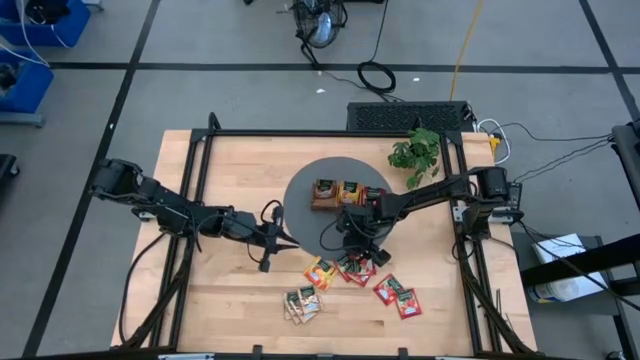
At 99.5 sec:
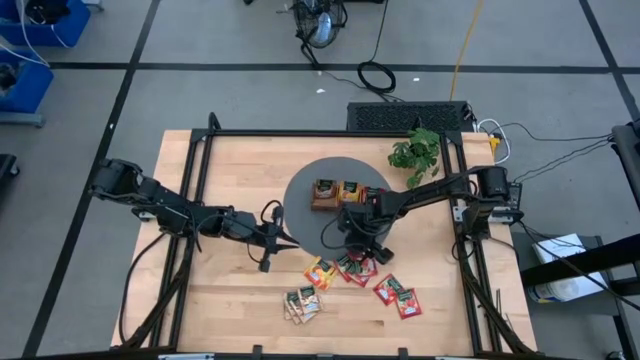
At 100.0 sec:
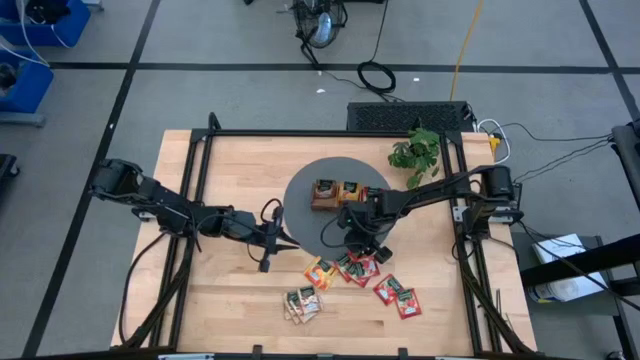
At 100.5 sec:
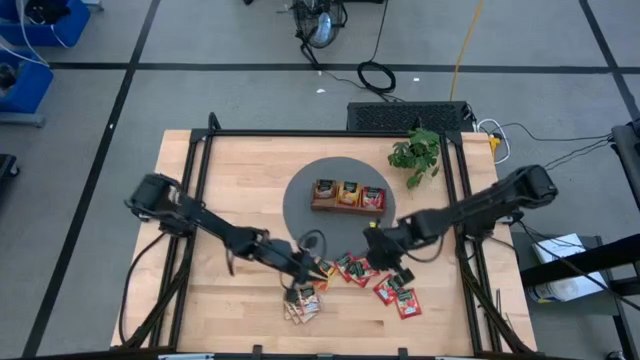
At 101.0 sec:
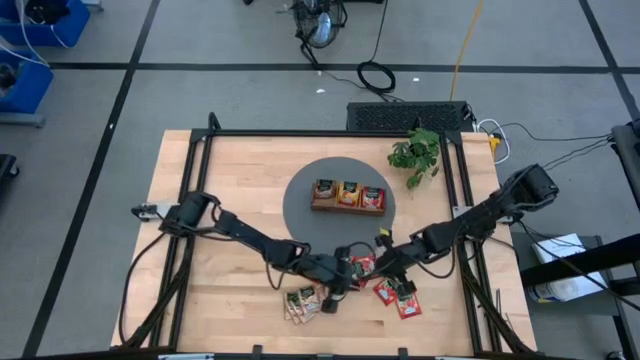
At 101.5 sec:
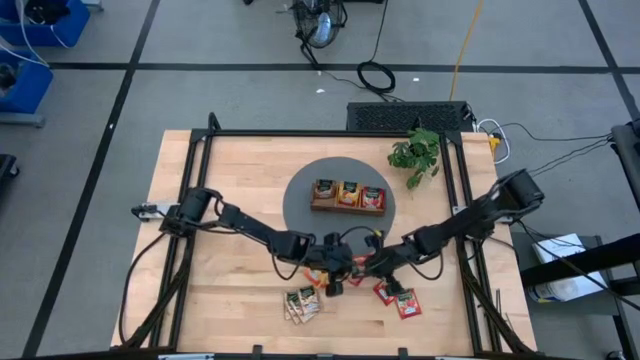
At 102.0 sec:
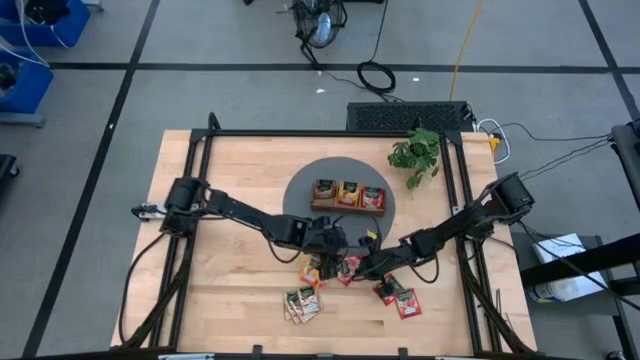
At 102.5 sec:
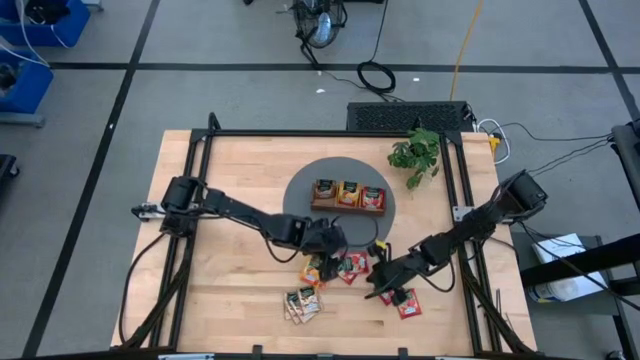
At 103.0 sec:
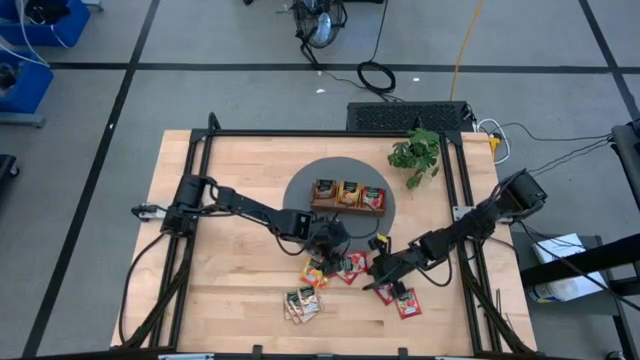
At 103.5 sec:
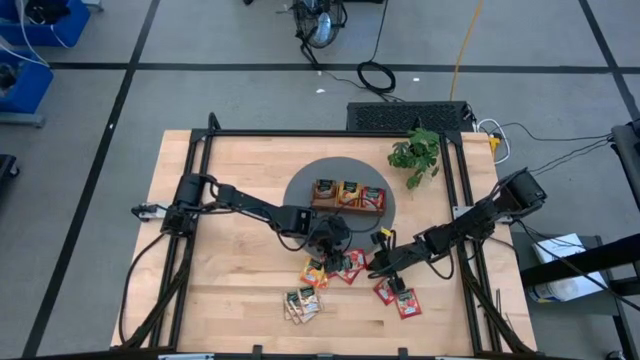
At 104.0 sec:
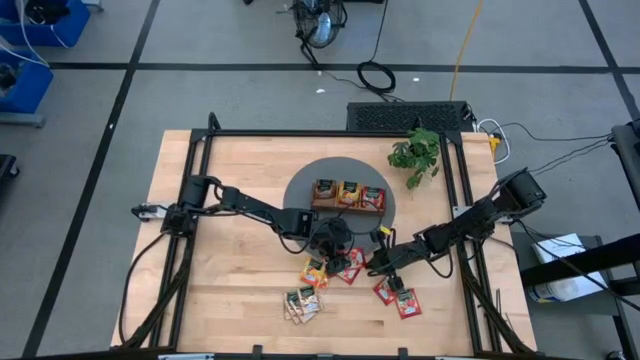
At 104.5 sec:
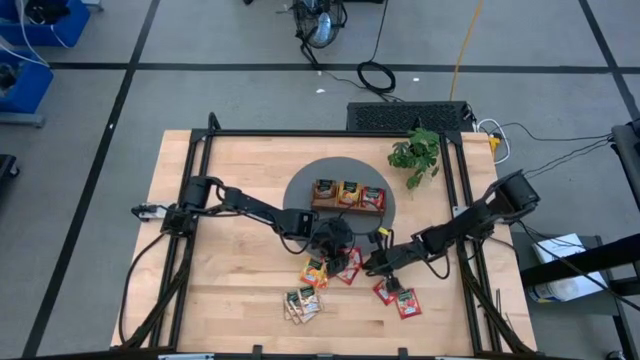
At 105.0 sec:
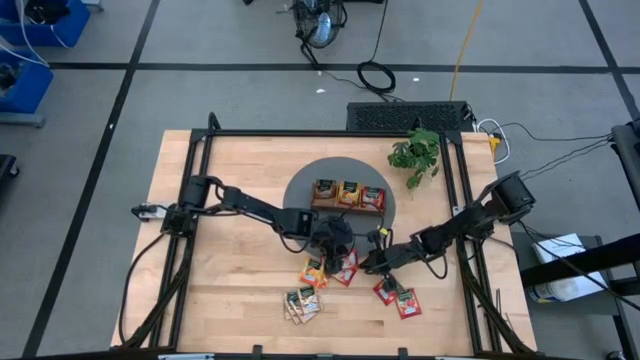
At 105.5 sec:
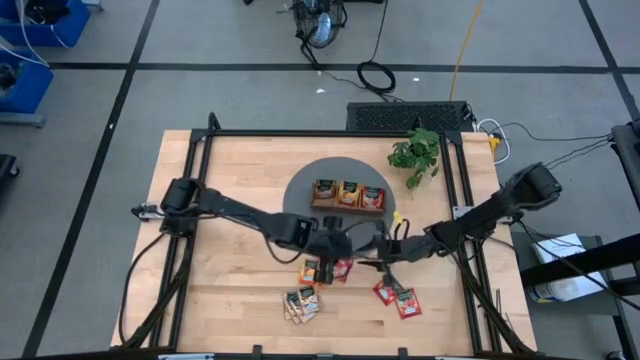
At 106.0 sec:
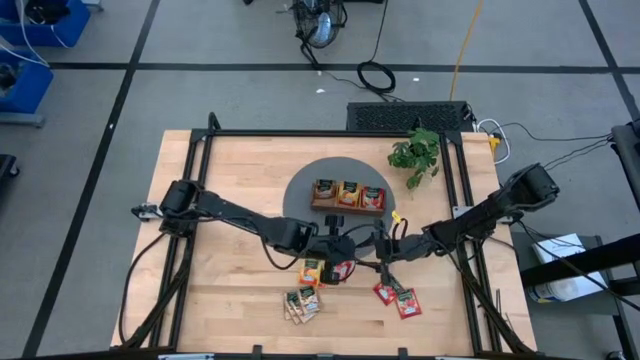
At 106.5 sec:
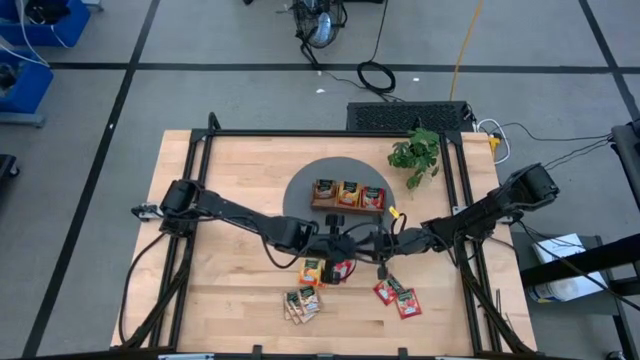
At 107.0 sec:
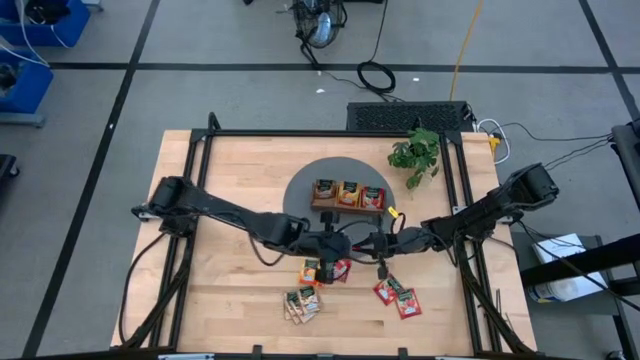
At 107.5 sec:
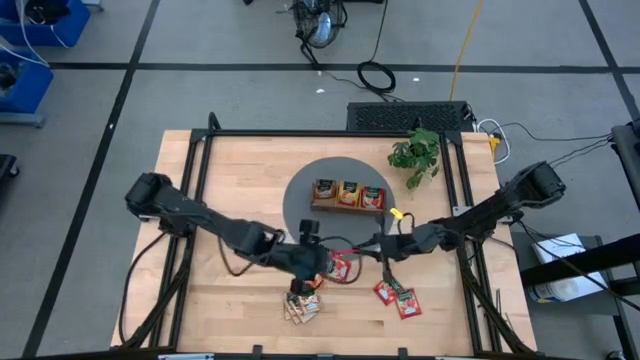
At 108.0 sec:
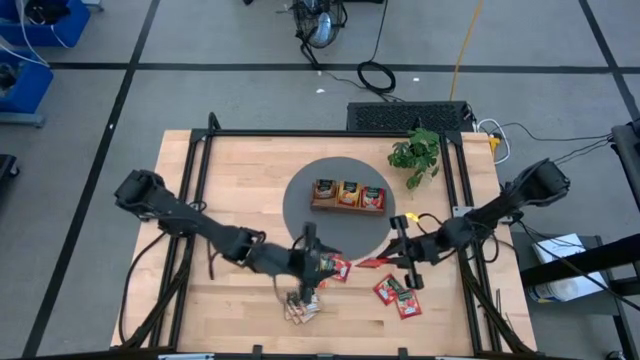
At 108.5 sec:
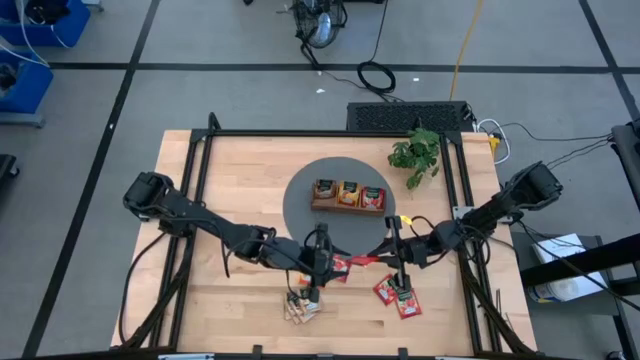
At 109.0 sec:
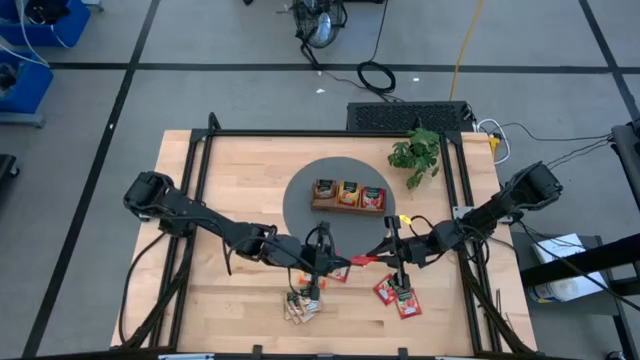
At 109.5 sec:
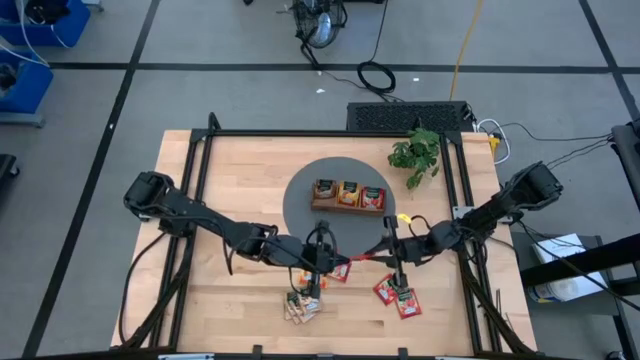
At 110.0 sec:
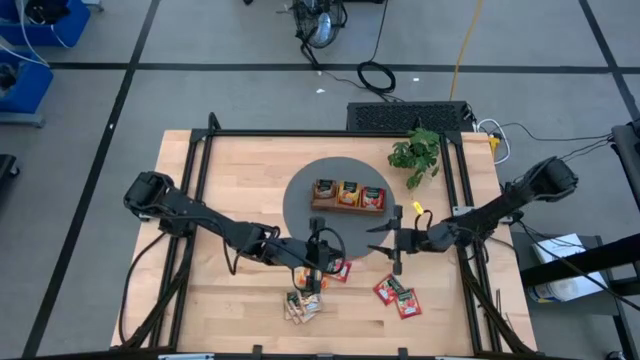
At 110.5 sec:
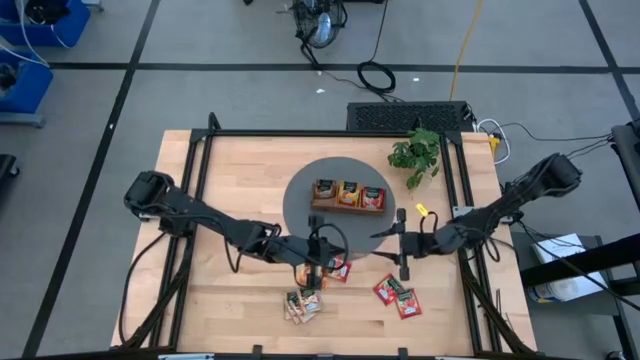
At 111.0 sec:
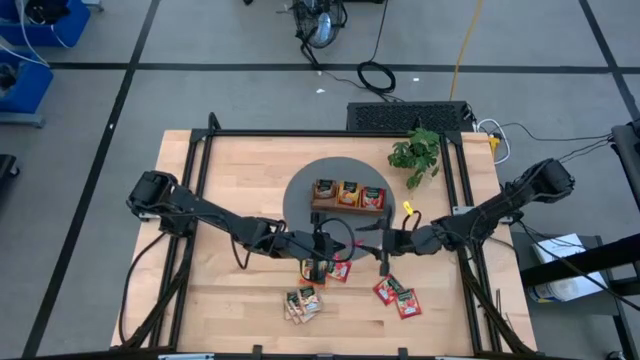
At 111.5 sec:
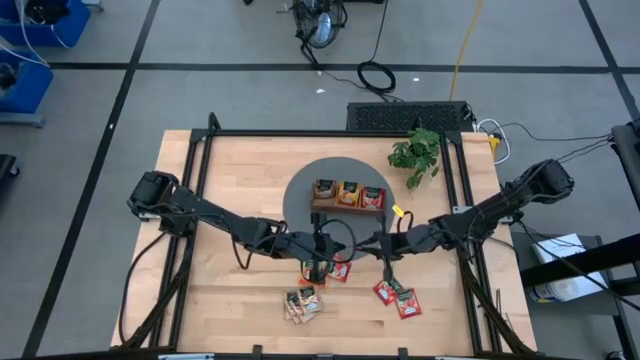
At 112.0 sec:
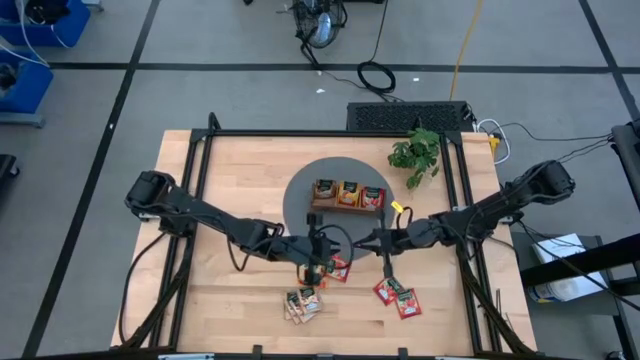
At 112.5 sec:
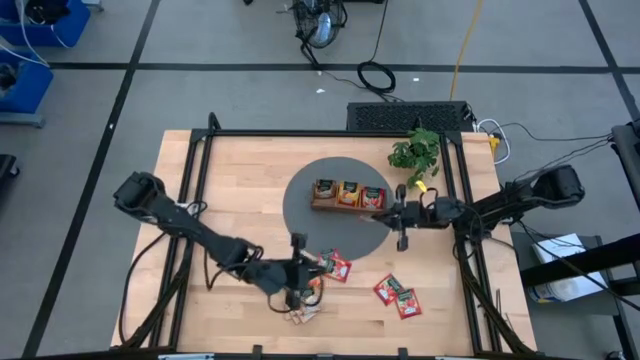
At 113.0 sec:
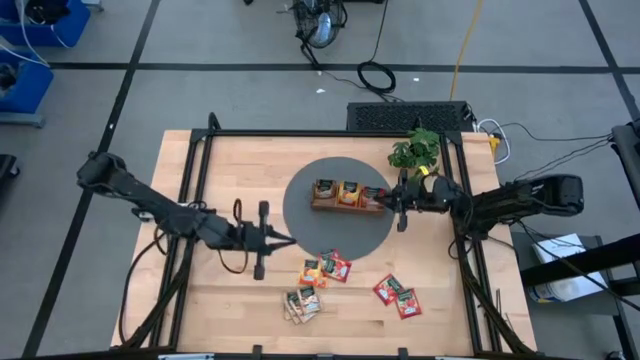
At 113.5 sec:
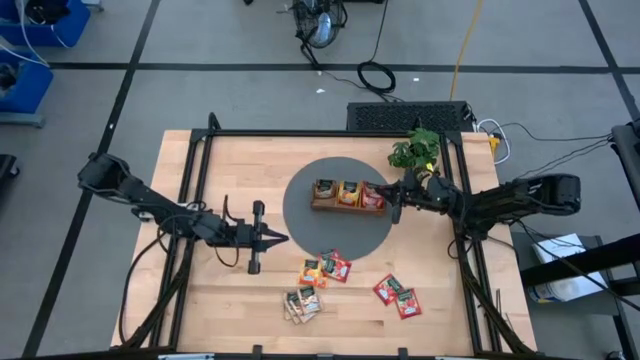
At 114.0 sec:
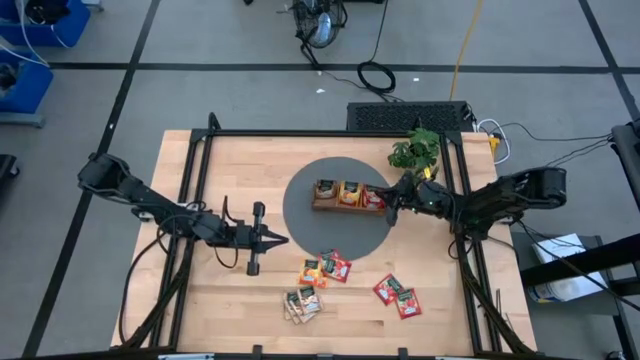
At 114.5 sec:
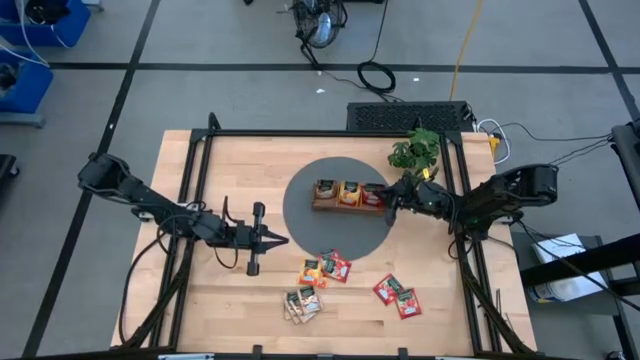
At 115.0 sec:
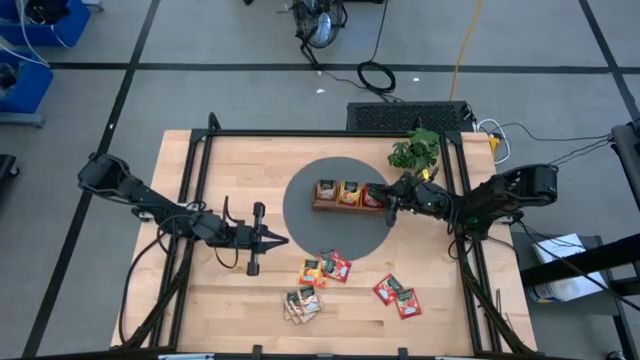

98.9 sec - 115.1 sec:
Task: Pick & Place Tea
Put the red tea bag to the right section into the wooden organizer

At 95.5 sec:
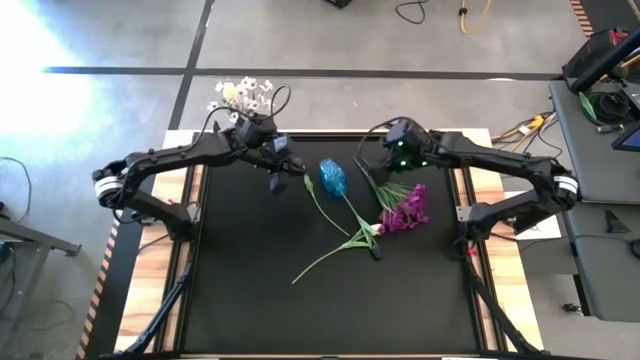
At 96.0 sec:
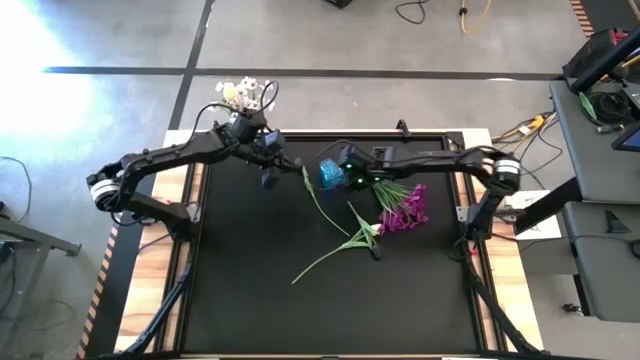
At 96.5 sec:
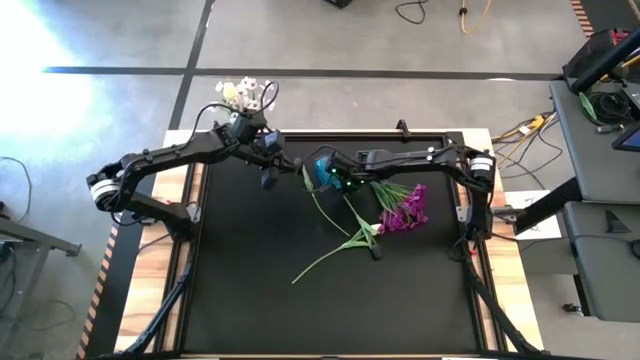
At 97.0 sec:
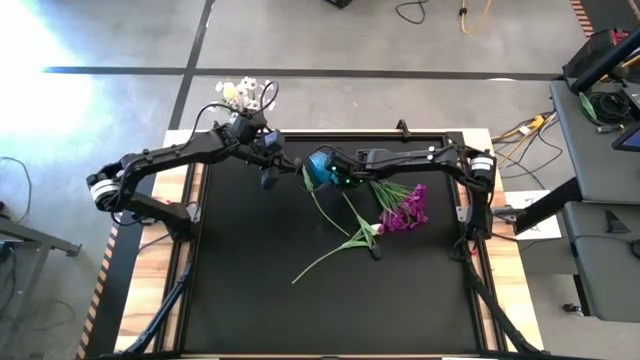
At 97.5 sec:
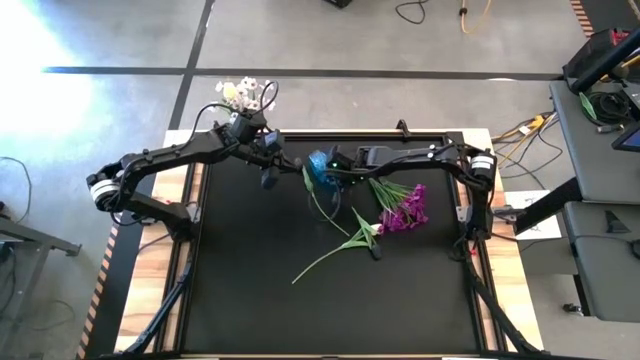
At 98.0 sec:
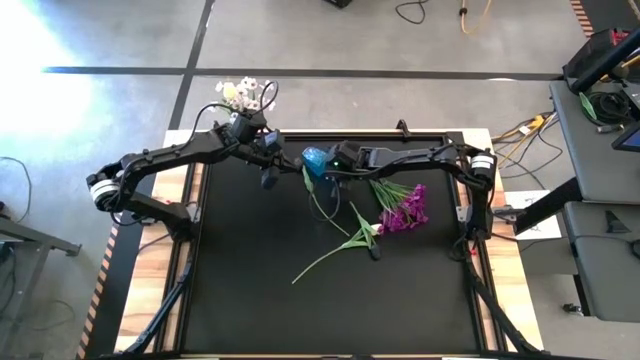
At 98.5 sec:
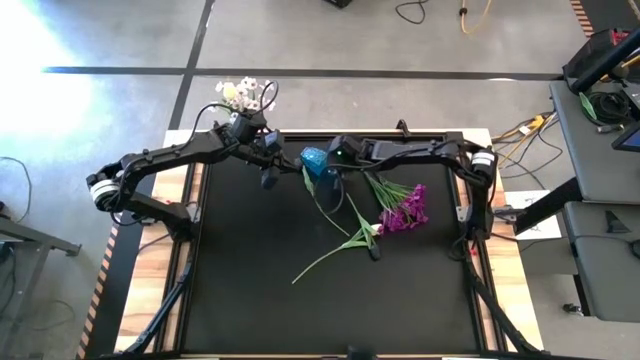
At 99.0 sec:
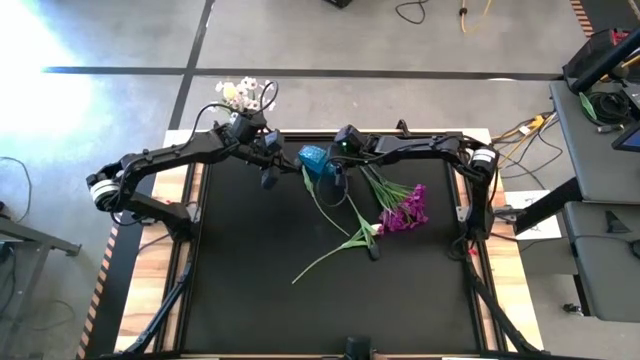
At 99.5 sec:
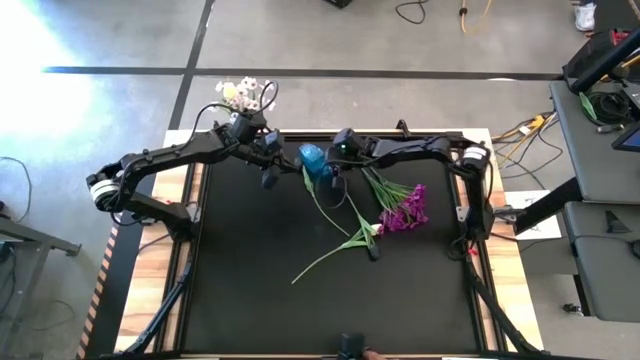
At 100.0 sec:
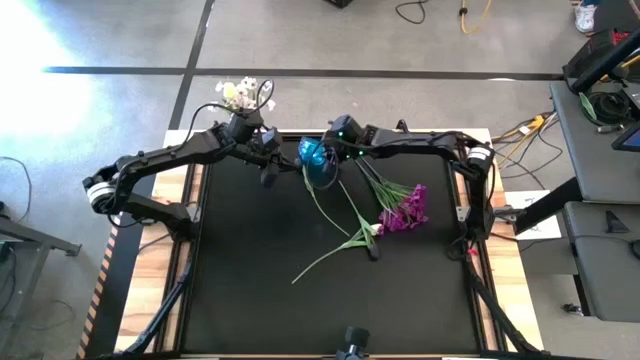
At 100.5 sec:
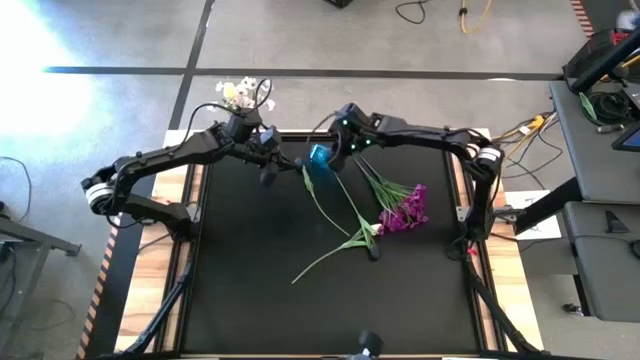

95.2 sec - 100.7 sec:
Task: Sort flowers into vase by color
Adjust the blue vase to the table

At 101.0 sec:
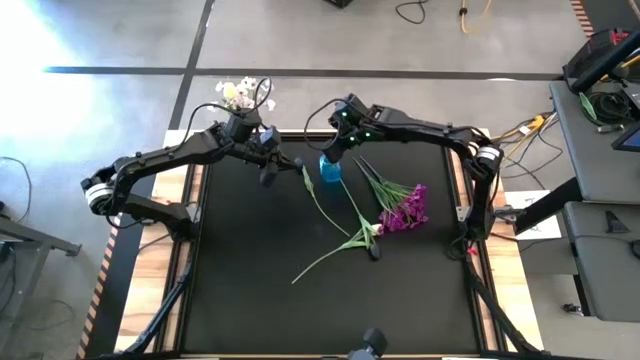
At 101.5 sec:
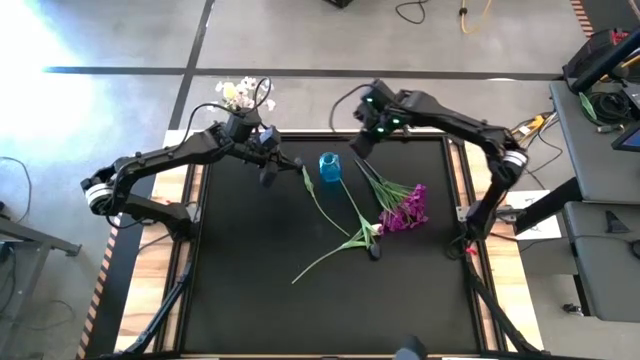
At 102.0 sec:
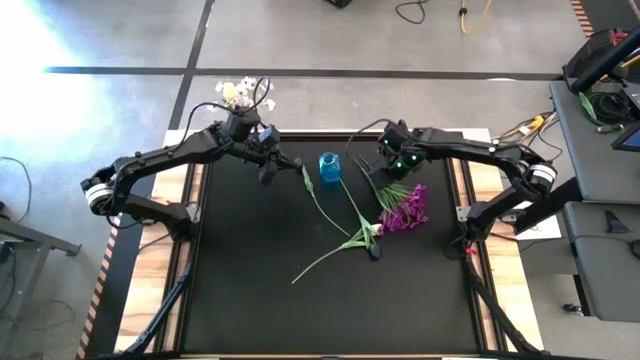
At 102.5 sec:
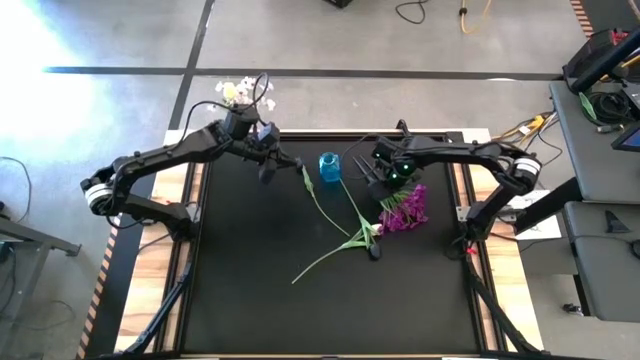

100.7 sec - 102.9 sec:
Put the bottom violet flowers into the blue vase
